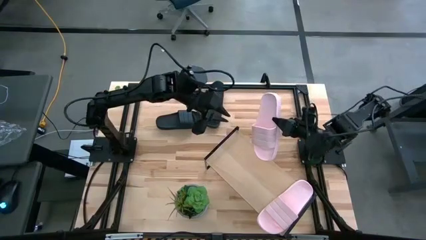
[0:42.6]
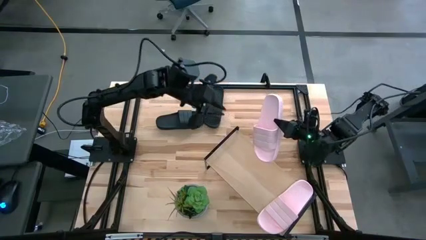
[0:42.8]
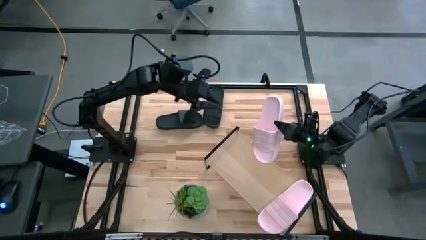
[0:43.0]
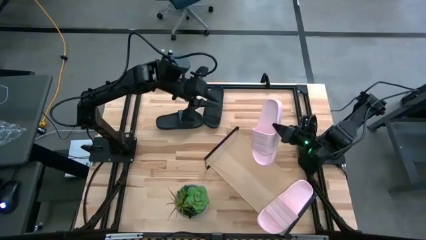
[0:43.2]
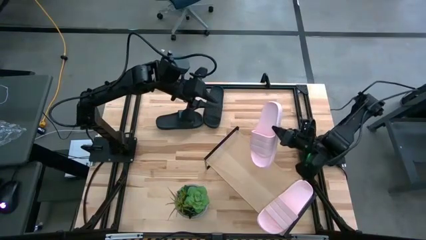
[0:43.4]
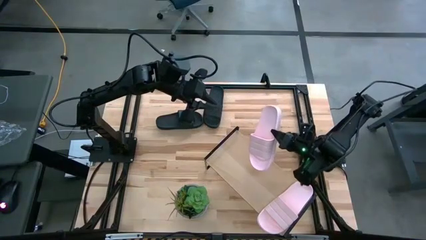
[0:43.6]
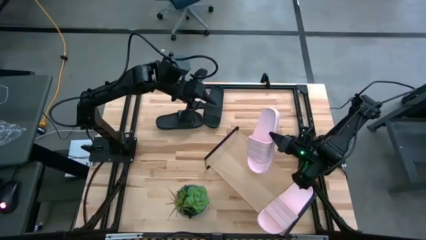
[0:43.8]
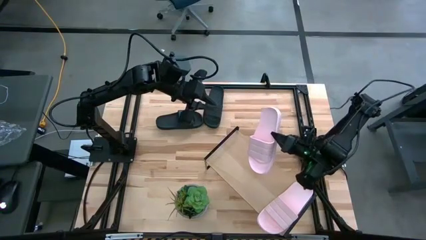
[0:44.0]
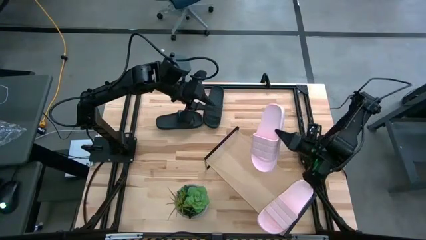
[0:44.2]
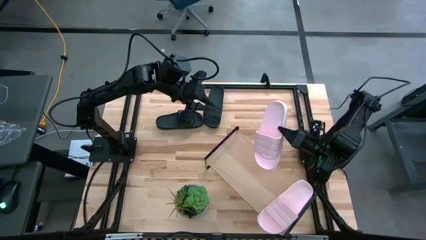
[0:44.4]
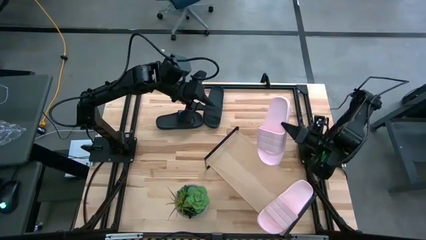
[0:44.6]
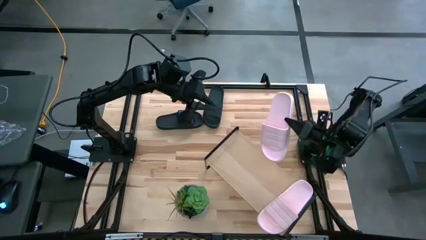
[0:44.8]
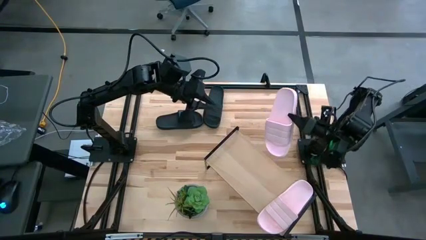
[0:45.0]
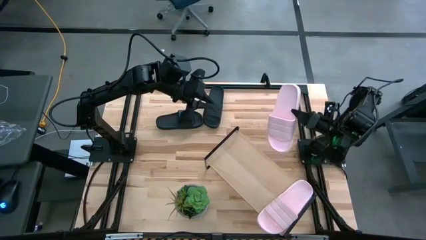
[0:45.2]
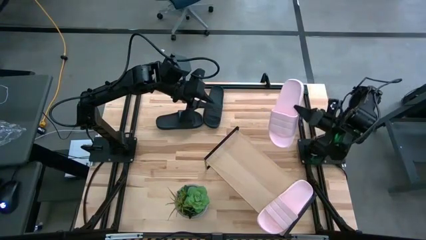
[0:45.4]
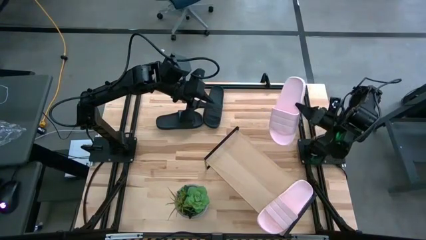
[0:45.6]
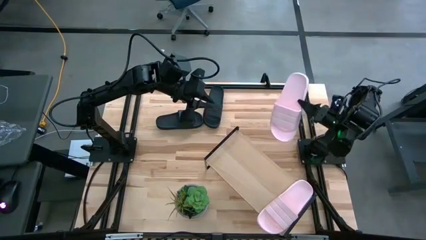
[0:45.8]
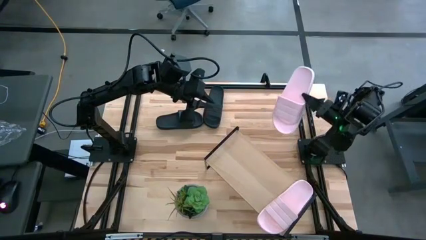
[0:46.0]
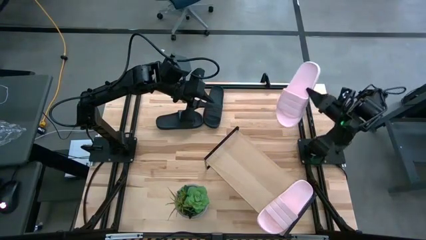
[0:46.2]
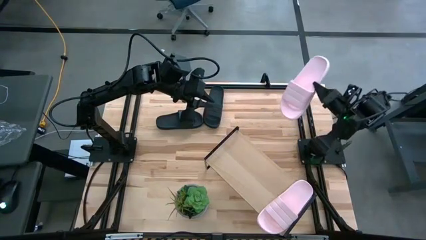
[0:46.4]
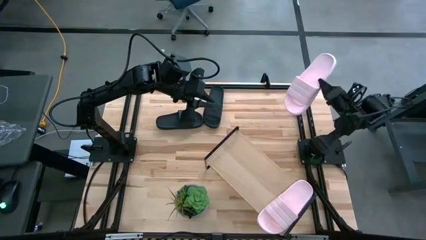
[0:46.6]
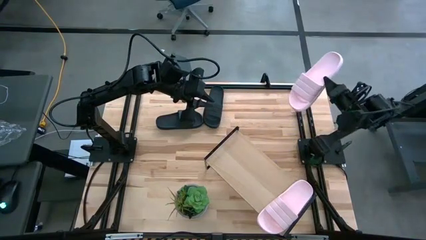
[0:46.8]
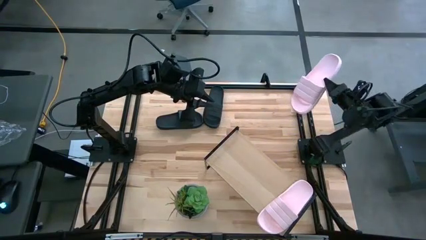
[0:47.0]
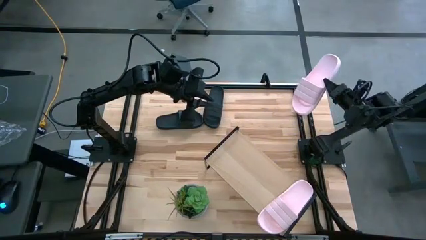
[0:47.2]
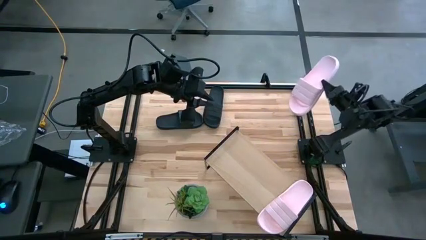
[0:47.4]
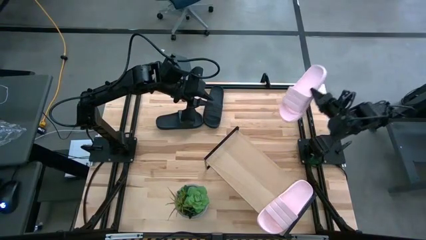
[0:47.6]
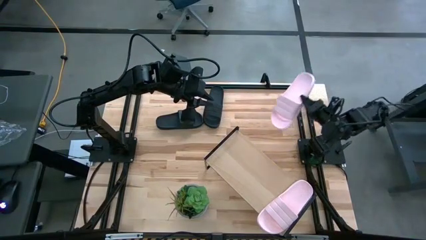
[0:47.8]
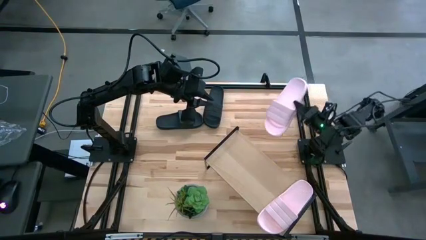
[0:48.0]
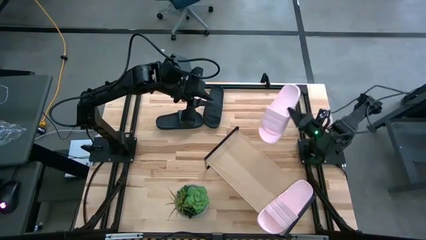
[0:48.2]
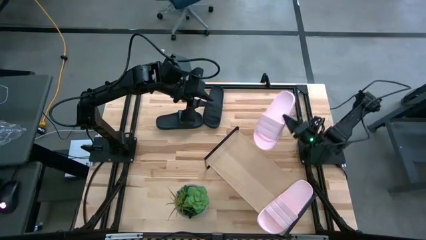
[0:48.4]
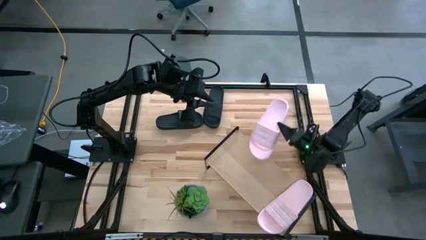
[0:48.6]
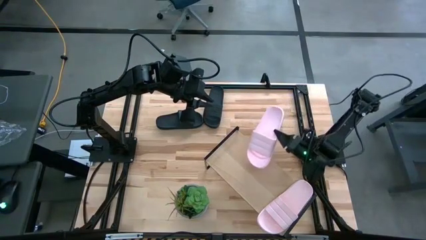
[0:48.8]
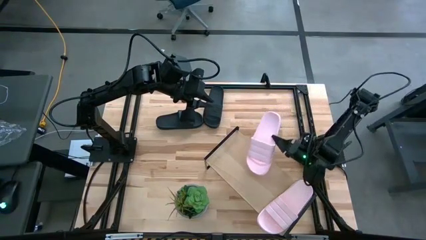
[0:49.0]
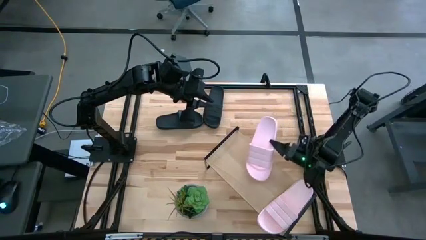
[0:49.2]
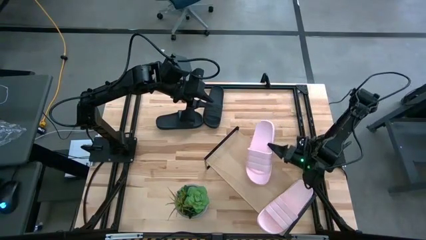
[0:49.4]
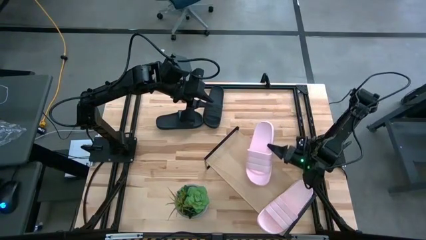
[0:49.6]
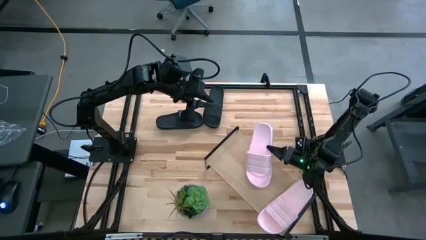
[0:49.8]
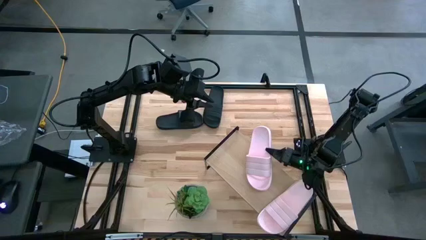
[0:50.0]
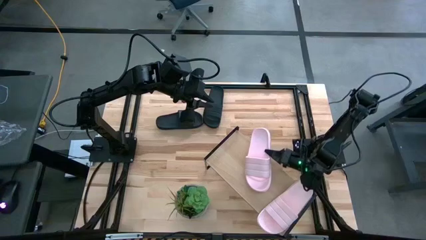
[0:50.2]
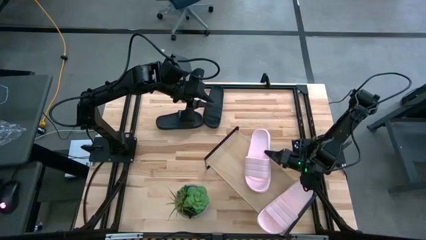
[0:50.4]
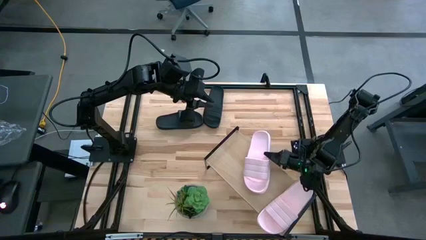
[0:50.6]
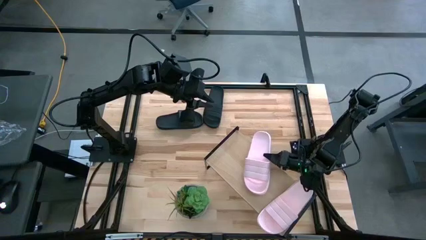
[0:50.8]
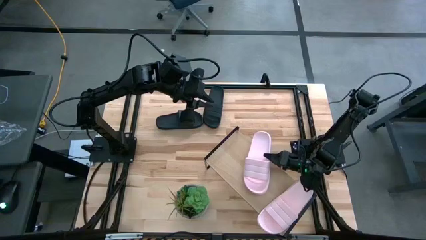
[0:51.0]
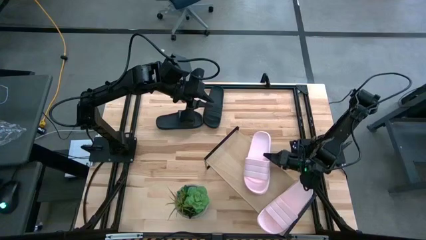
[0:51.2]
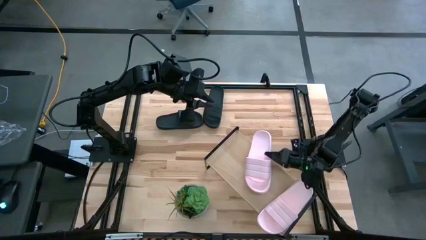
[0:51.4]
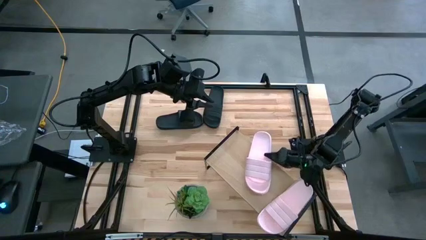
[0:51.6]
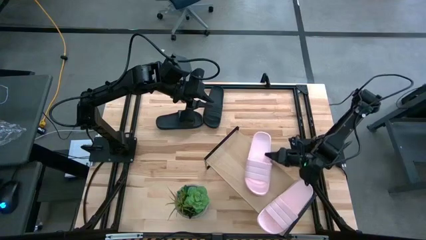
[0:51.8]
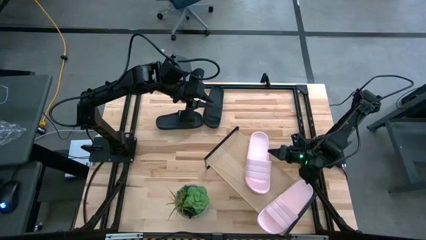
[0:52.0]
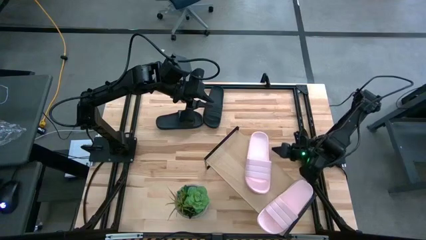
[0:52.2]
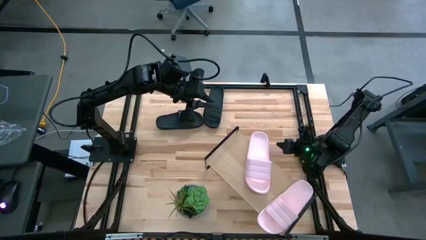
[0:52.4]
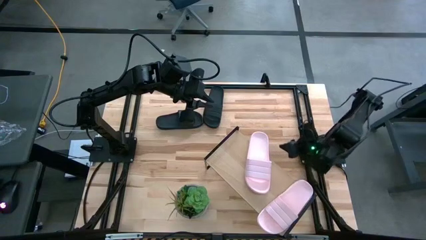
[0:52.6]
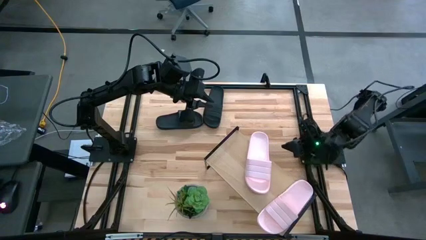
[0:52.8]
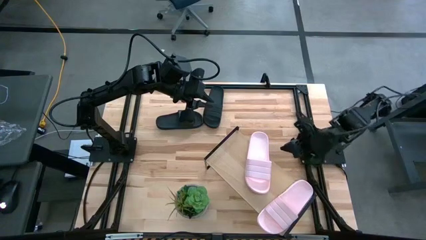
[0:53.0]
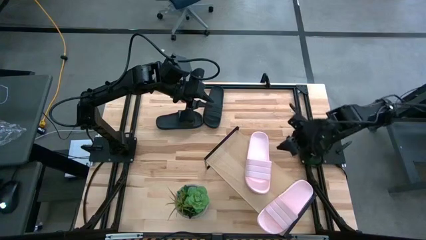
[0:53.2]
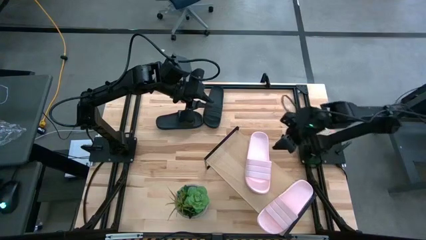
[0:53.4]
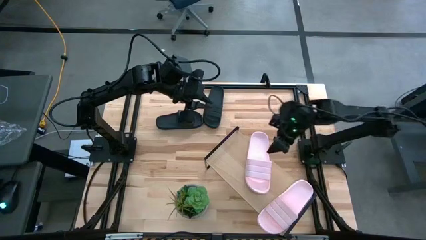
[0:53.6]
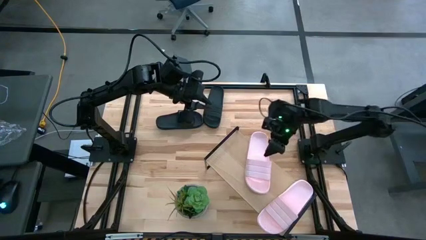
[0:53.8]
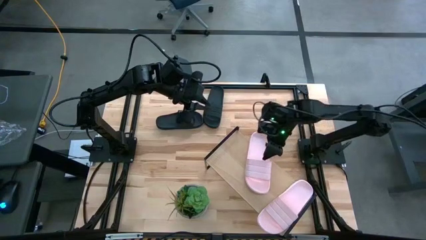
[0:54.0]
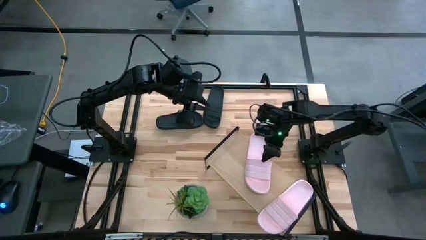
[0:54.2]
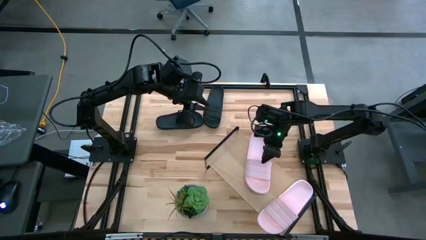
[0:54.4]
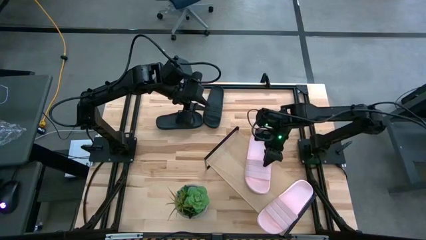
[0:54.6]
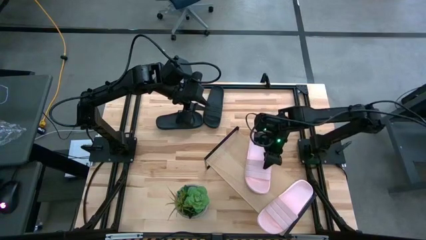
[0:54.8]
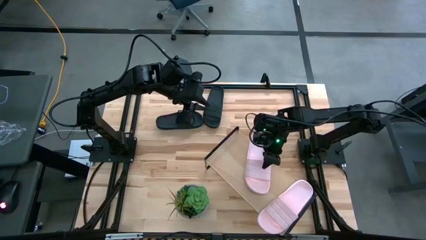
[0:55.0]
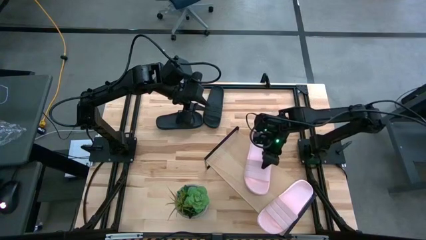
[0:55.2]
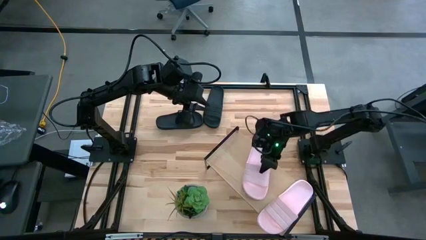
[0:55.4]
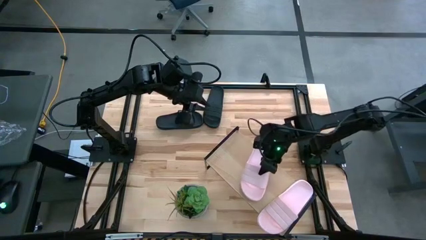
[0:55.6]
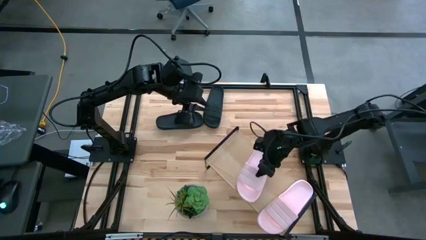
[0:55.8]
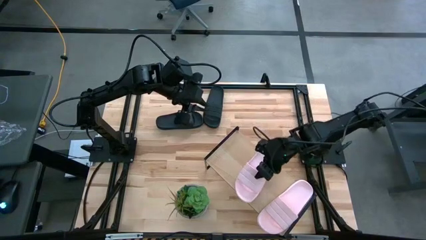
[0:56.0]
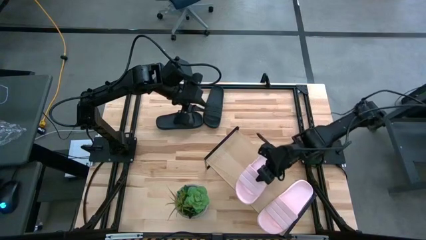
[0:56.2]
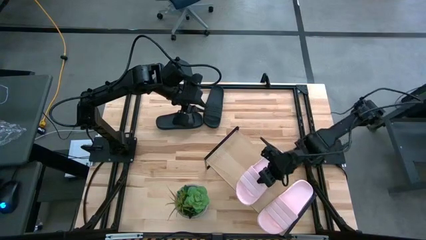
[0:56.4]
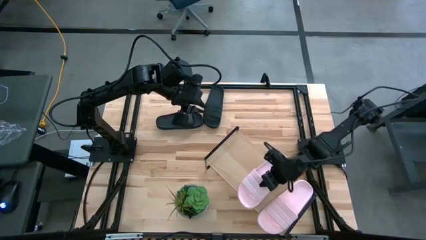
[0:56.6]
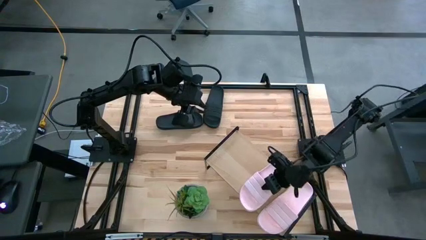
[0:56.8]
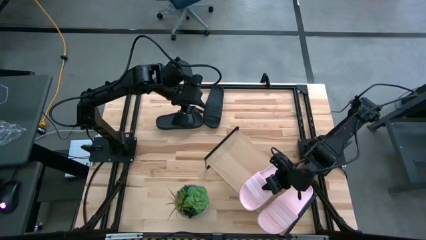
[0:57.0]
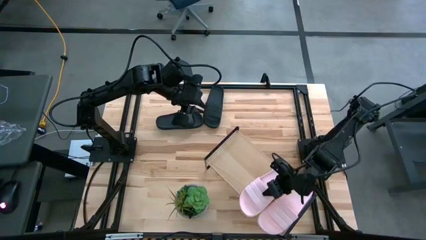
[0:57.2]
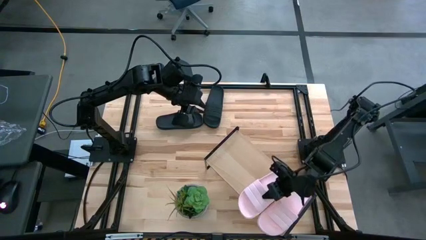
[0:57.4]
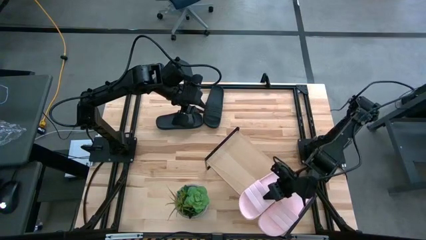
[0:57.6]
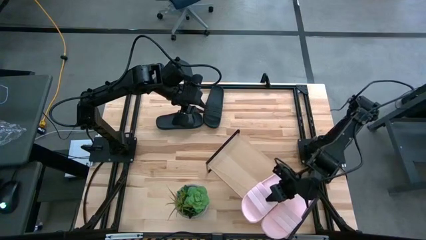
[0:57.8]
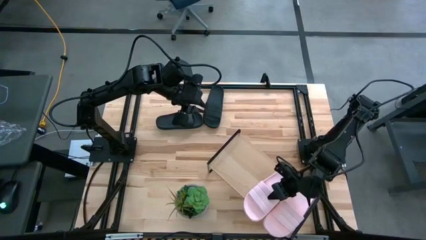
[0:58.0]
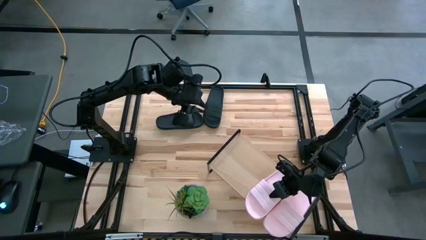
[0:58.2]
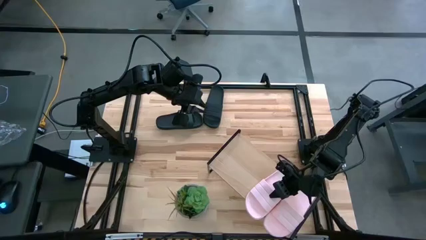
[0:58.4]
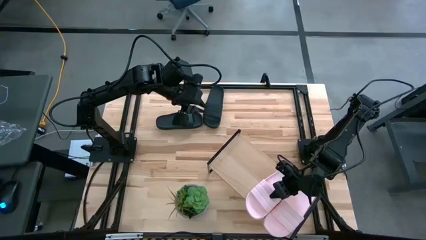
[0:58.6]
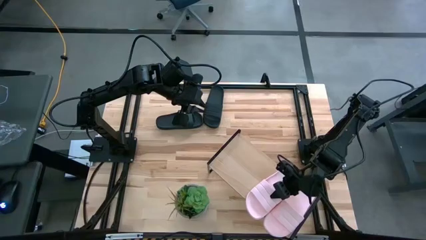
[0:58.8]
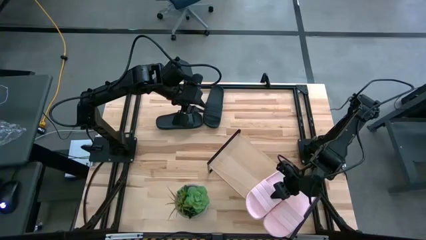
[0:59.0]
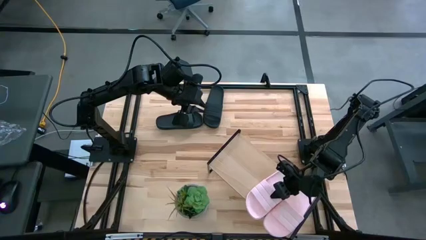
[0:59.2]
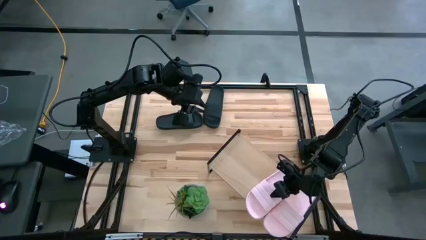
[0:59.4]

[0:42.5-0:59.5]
Task: Pick and place slides into the shelf
Put the pink slides on the shelf
